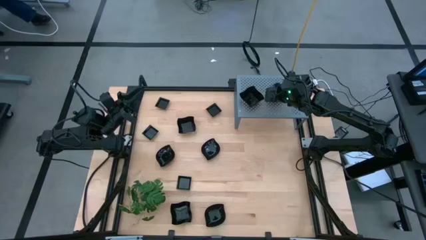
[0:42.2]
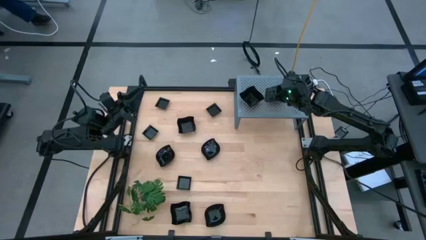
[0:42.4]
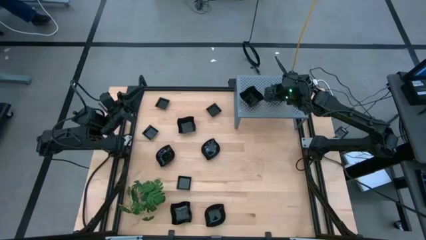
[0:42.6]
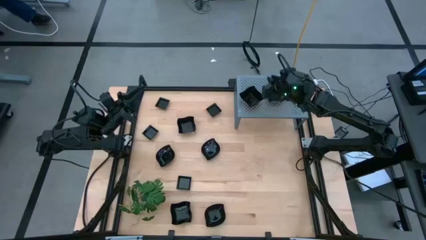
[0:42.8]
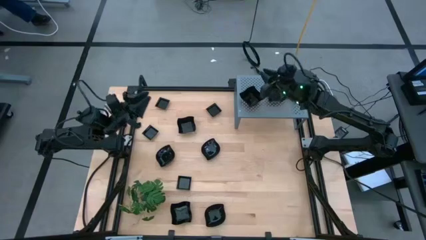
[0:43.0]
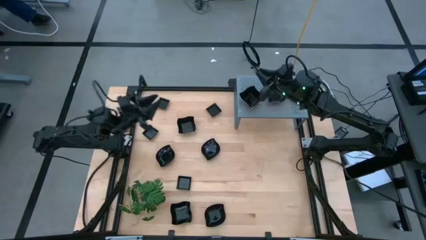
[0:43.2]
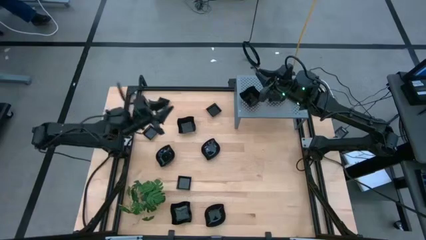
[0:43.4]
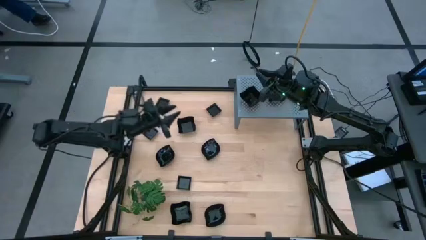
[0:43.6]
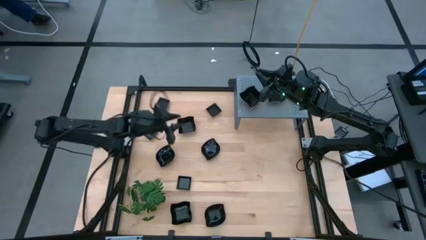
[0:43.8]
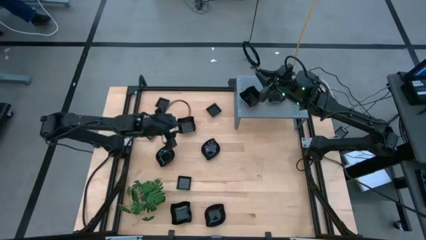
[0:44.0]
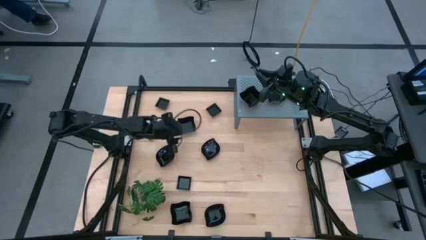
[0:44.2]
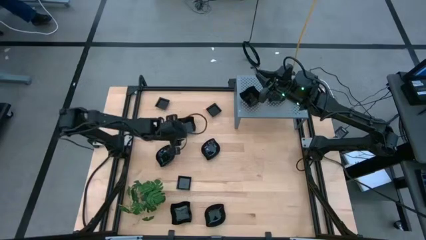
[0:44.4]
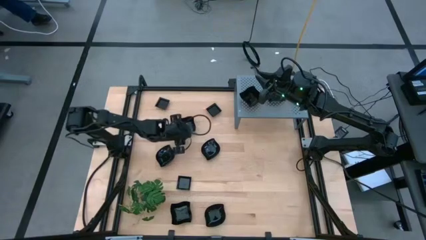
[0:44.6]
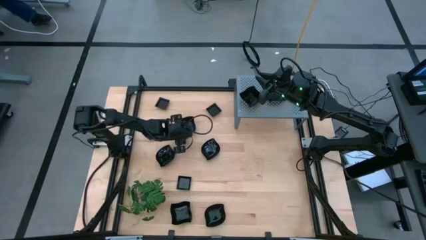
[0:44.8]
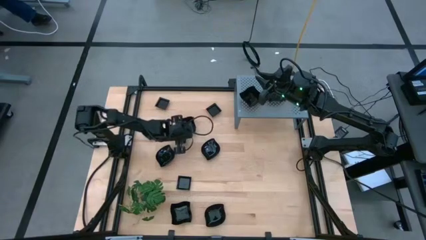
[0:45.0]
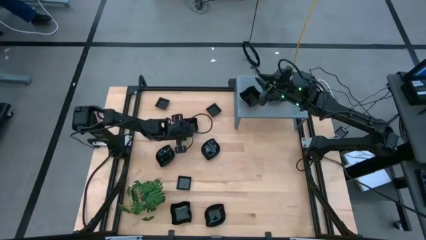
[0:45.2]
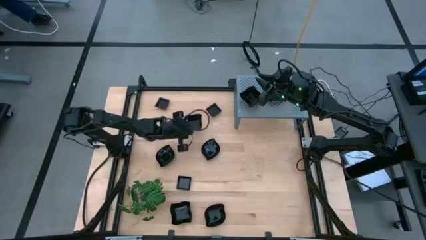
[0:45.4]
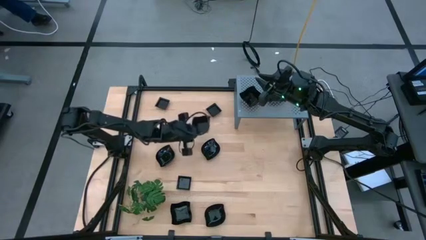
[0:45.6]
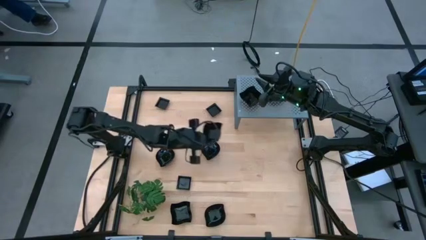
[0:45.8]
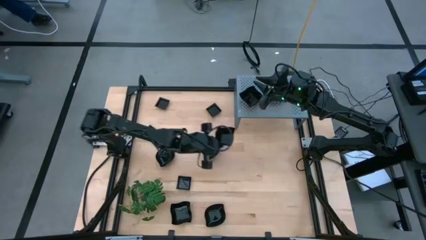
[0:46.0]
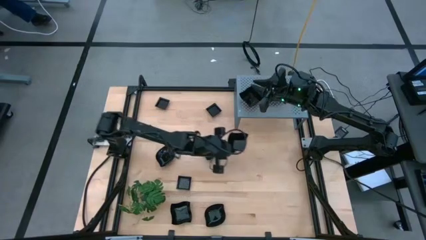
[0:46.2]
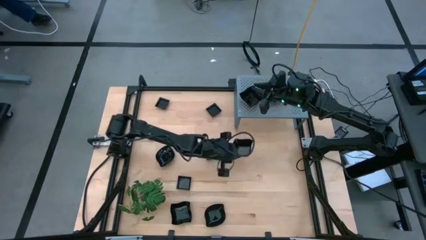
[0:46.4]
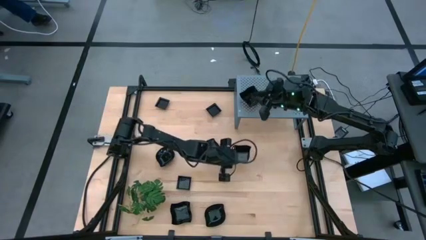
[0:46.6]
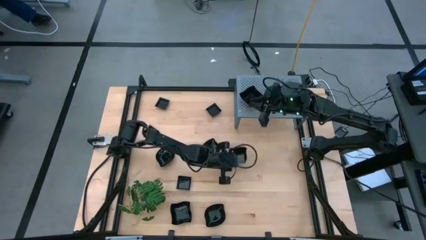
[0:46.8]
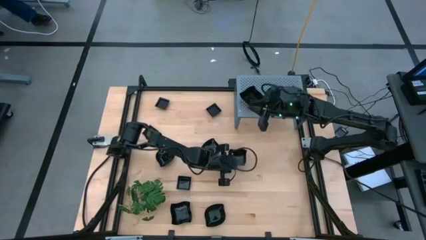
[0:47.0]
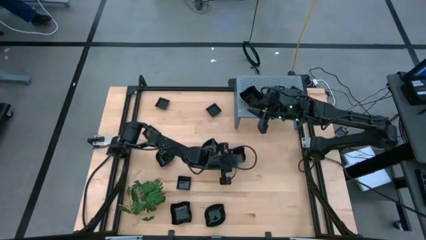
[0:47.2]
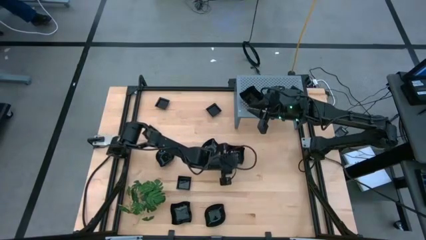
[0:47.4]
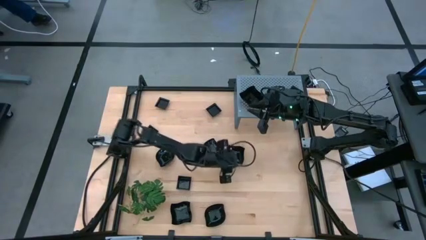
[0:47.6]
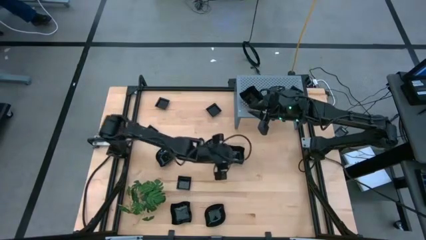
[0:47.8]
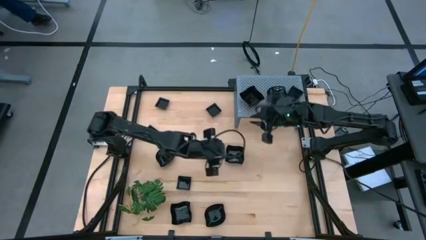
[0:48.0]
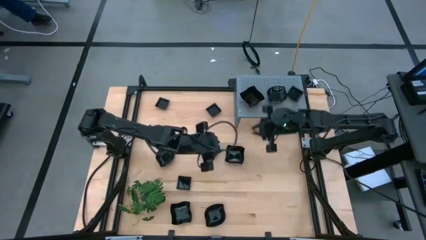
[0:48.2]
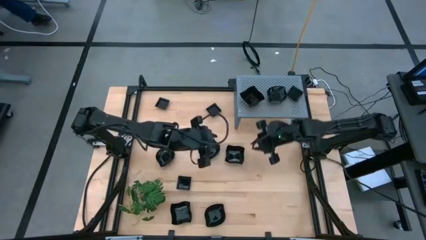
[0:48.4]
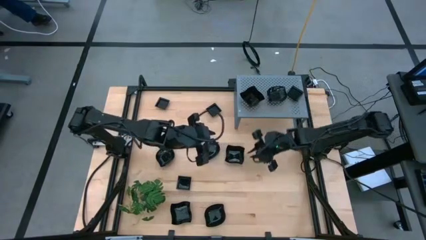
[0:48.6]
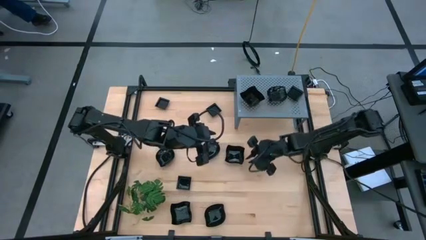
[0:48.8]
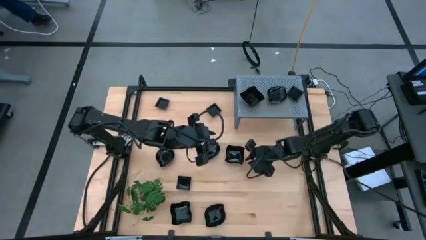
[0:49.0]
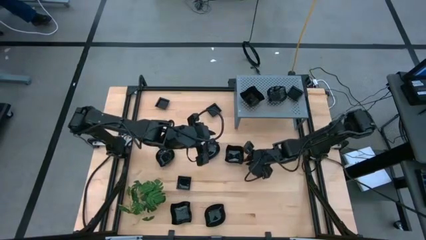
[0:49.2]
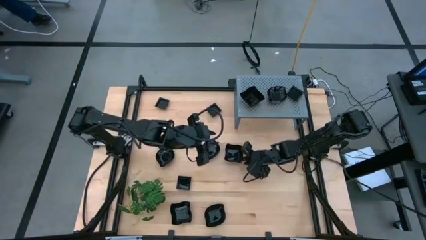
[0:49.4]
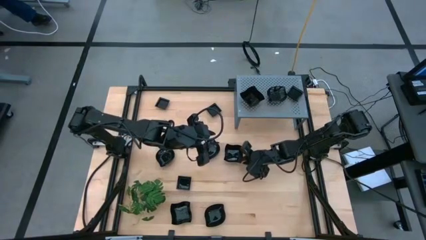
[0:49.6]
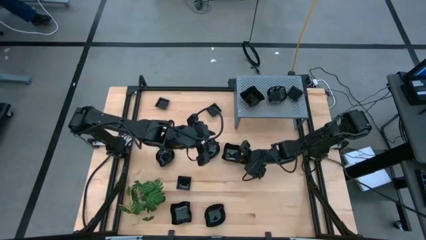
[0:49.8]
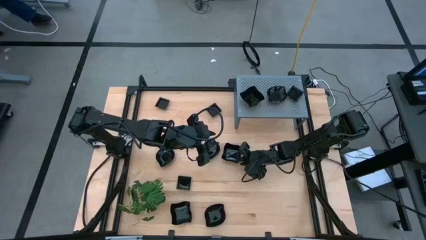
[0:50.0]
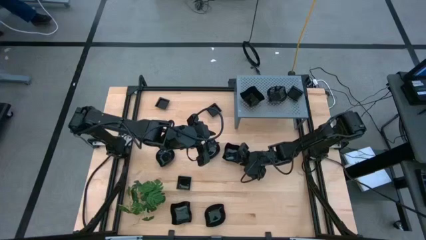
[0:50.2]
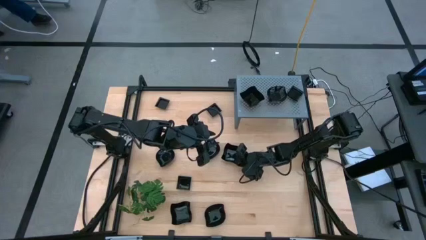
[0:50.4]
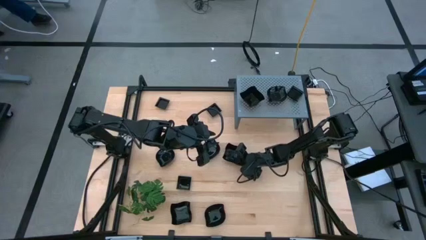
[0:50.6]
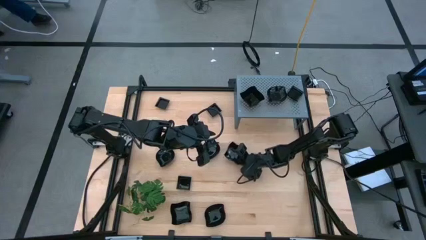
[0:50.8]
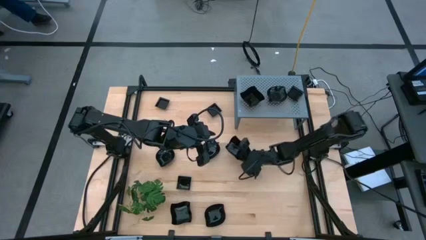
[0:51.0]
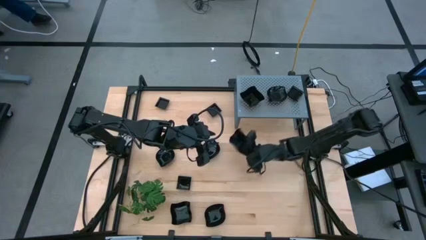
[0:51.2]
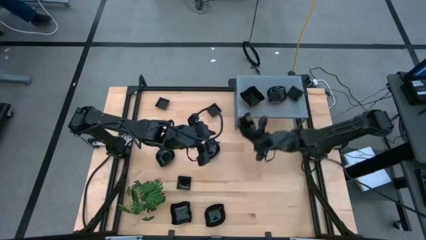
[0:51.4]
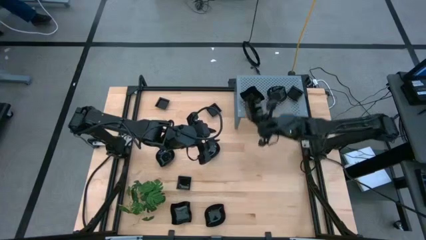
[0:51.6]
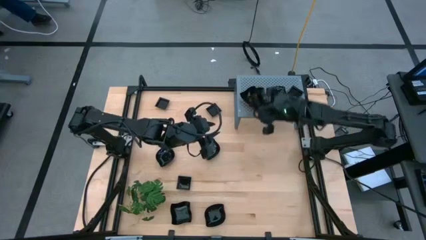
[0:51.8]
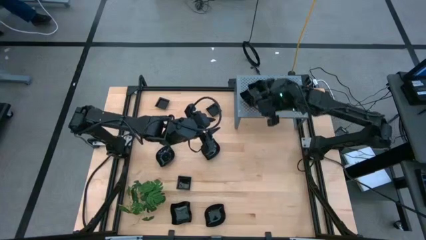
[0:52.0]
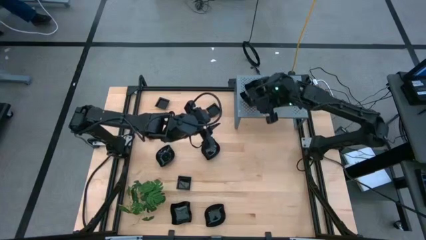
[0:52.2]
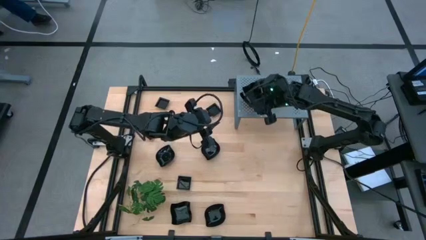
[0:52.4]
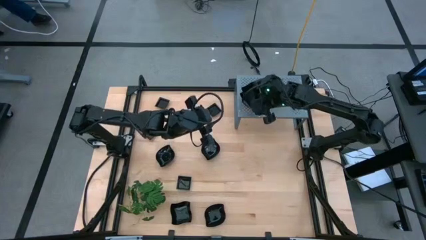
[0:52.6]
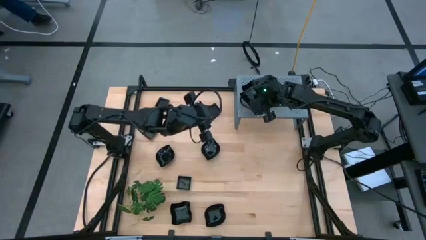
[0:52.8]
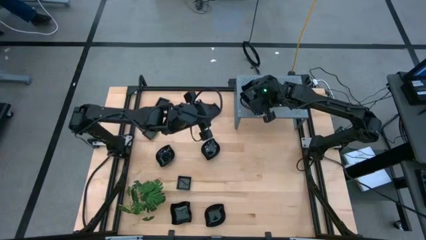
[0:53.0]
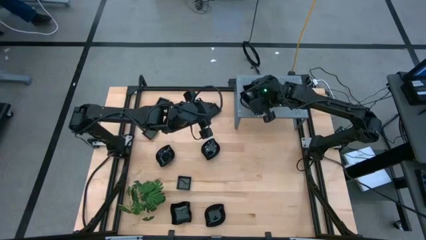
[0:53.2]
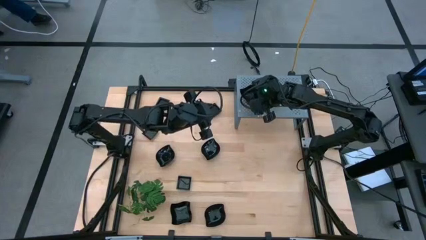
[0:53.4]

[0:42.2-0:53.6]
Task: Pick & Place Mini shaped plates
Stack the black distorted square plate on top of the black distorted square plate on the shelf

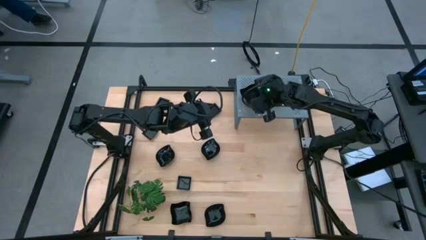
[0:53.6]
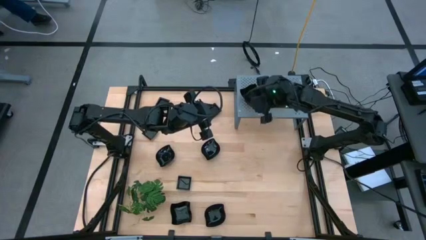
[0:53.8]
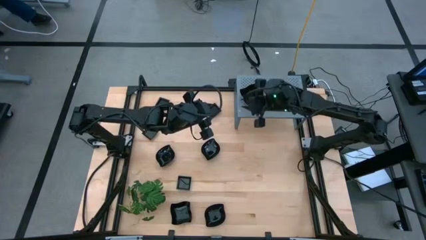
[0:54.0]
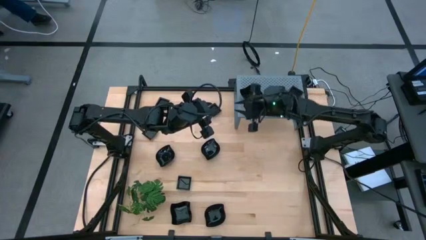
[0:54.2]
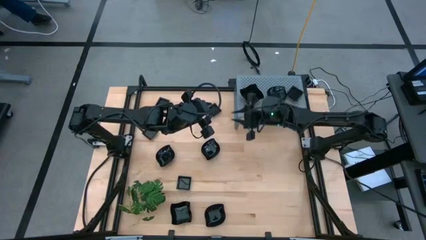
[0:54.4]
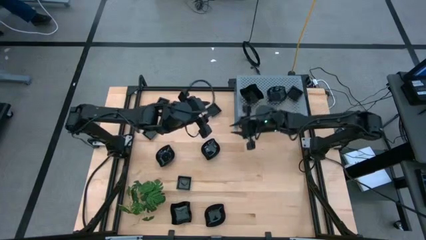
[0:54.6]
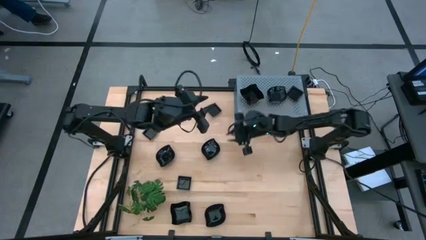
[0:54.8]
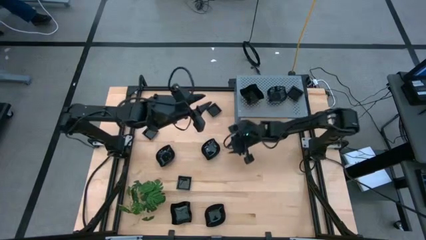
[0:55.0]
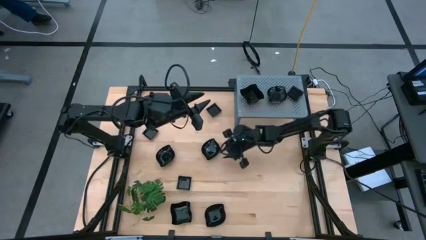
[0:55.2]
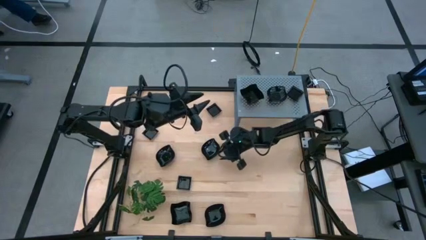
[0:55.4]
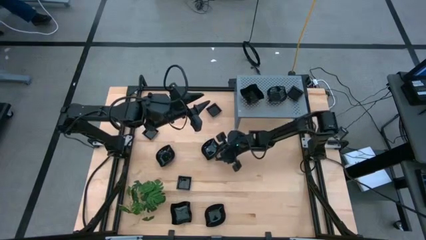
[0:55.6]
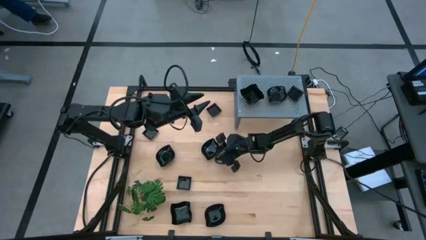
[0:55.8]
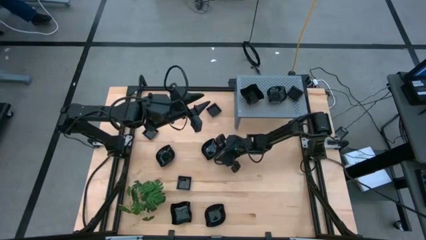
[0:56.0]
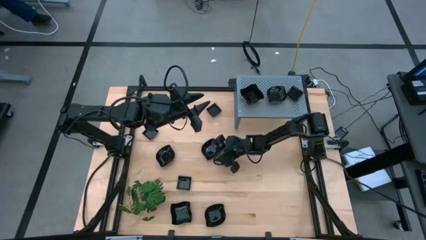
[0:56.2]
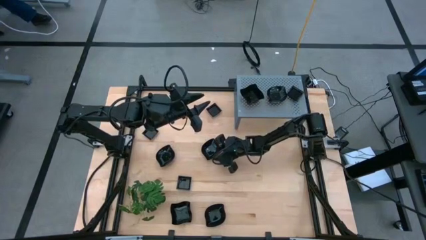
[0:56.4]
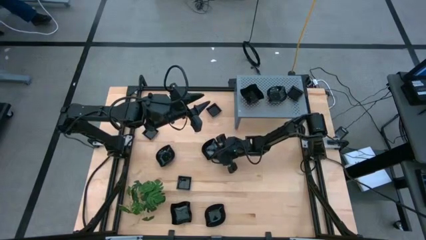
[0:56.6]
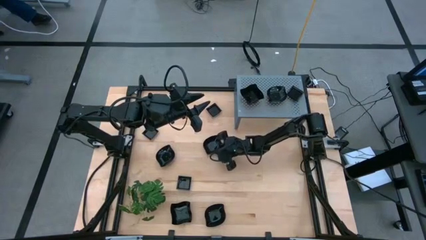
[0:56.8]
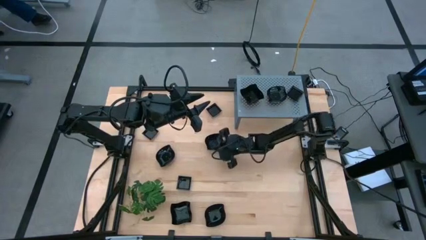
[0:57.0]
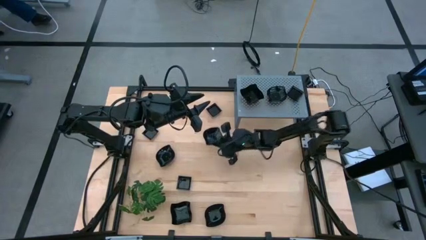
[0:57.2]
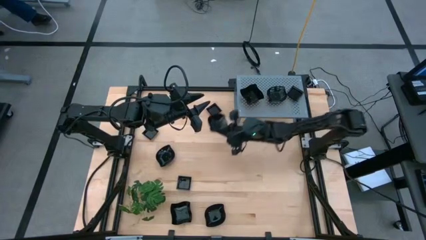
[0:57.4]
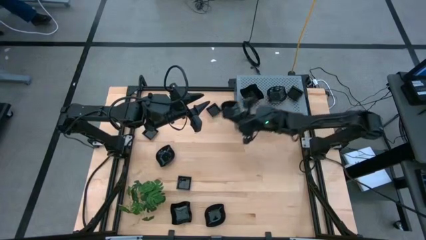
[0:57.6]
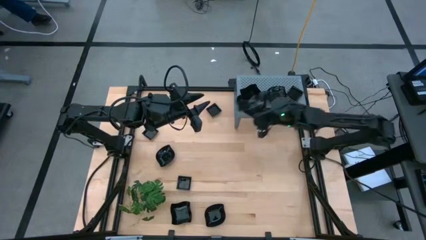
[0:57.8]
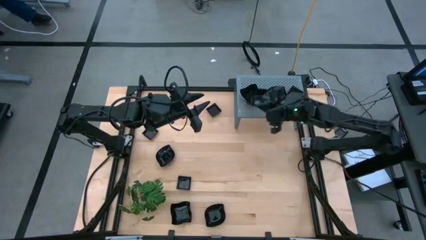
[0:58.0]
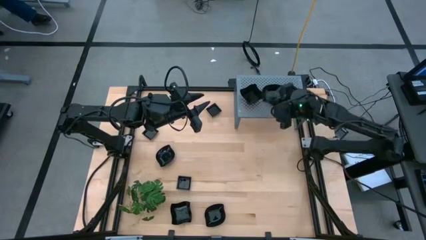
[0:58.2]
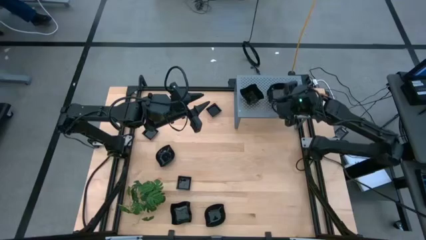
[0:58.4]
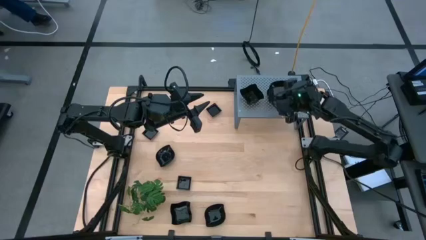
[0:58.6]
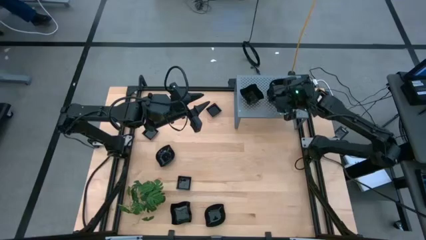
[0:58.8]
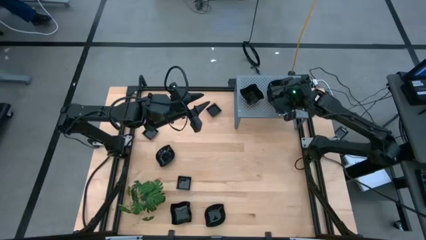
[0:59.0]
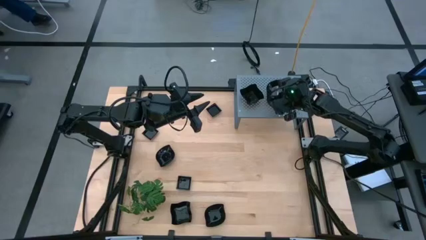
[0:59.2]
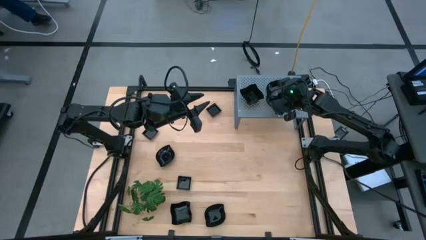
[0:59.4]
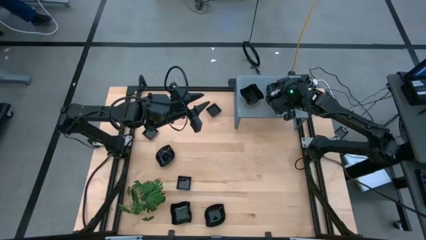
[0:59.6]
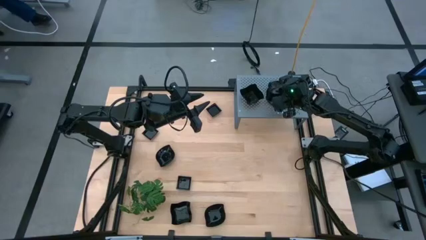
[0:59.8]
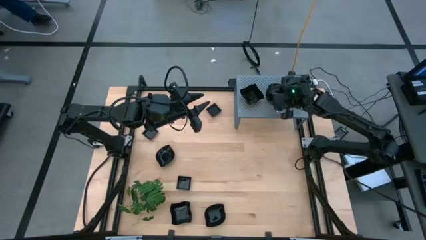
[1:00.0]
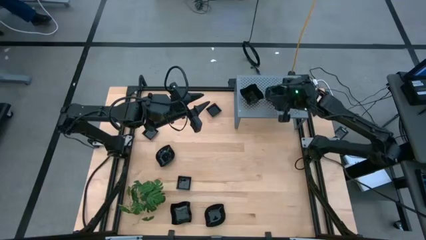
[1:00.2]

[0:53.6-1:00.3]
Stack the black leaf-shaped plate on top of the black leaf-shaped plate on the shelf
